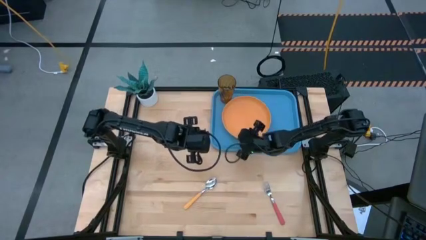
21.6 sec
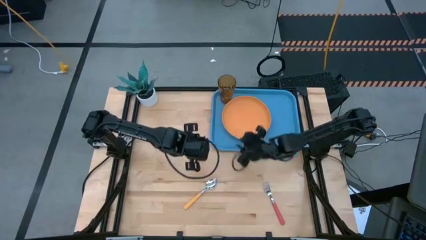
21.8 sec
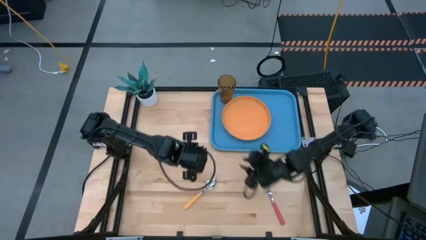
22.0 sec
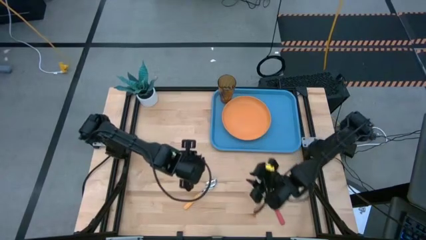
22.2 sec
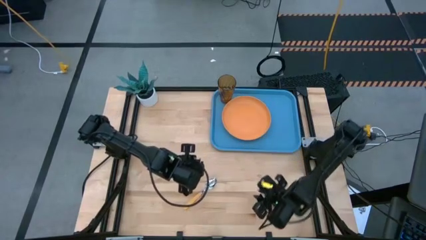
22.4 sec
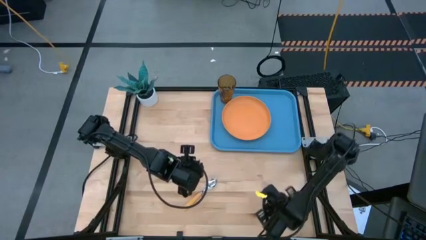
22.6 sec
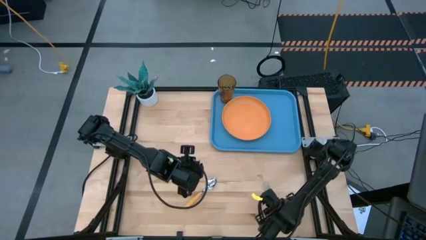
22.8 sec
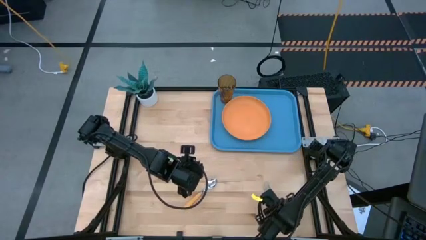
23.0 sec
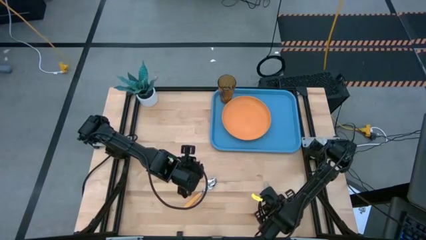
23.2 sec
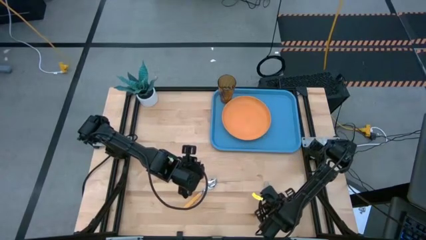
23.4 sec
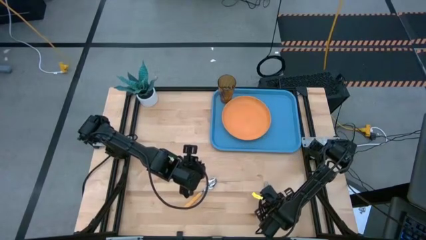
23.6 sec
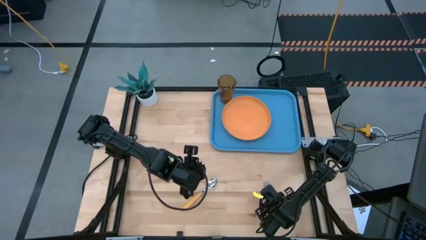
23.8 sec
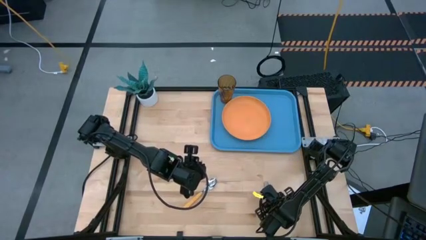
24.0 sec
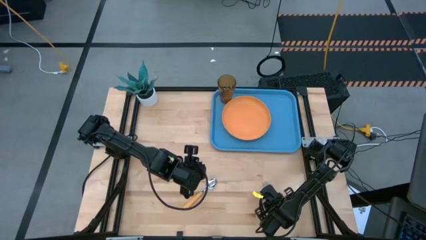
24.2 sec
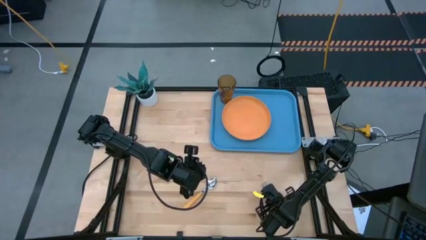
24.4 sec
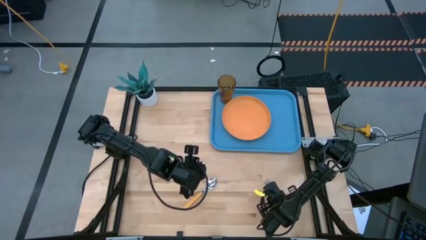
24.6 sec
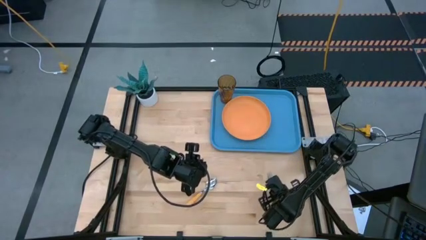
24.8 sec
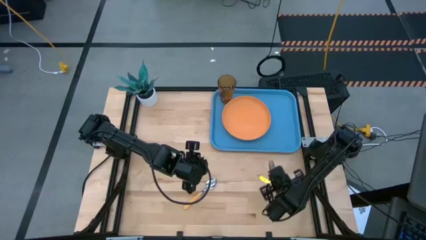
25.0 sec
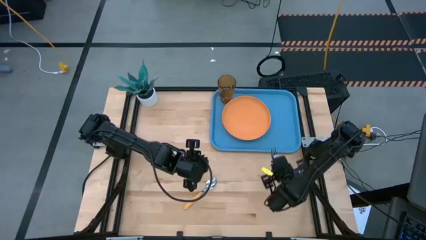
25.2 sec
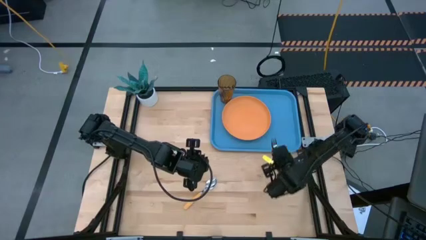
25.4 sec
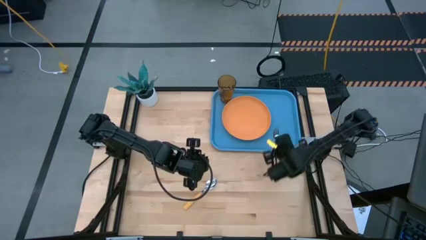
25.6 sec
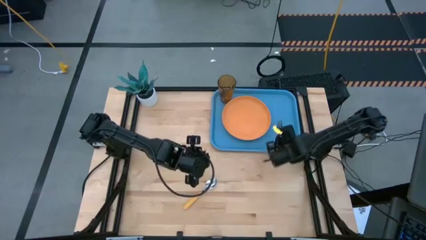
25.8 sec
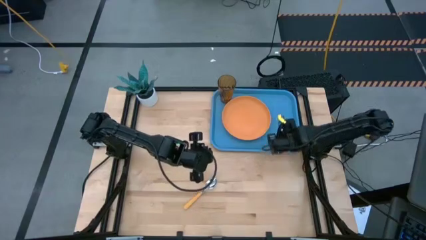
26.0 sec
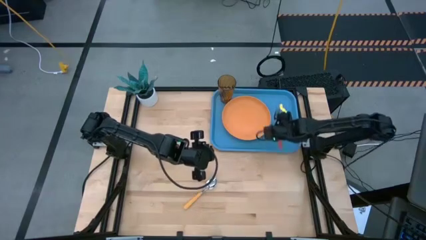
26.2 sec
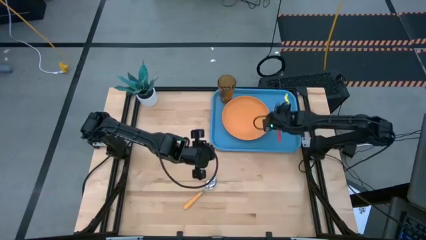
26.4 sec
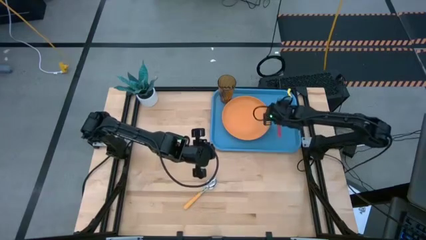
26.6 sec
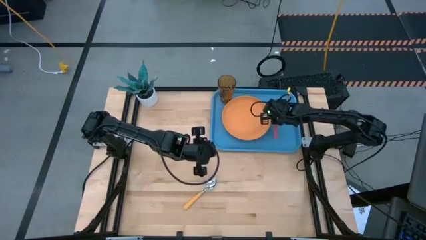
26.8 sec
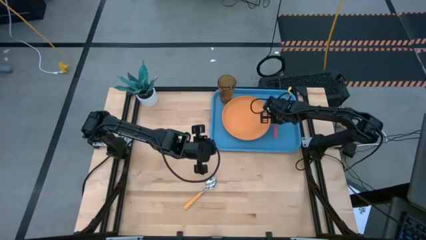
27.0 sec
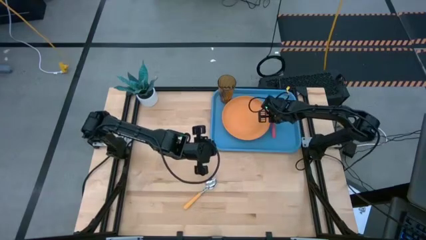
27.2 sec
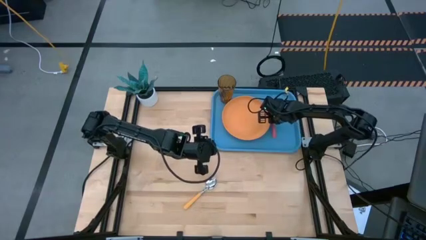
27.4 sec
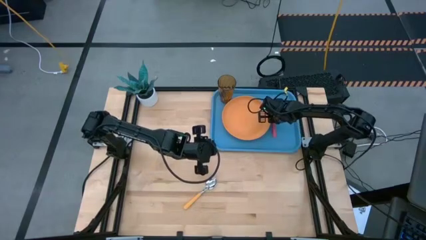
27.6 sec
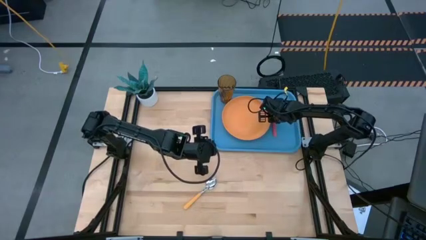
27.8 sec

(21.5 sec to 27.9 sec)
Task: Pick and place plate/cup/fork/spoon on tray
Put the red fork on the blue serving tray to the right of the orange plate

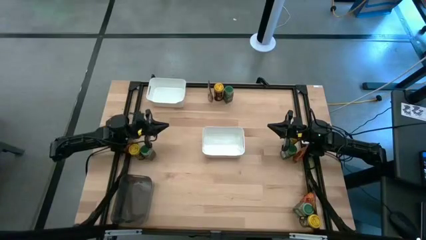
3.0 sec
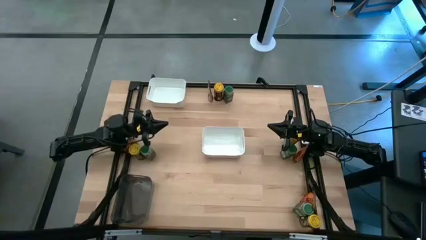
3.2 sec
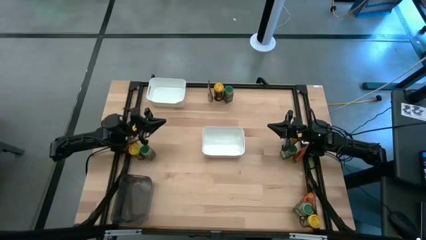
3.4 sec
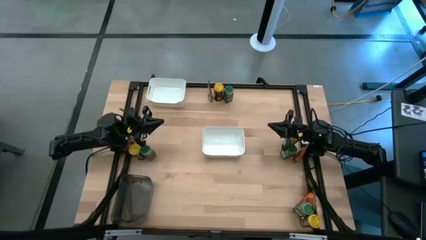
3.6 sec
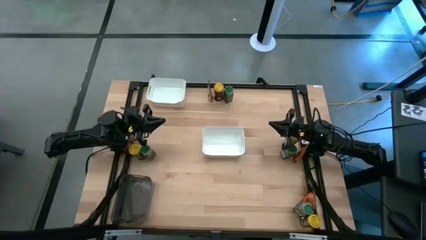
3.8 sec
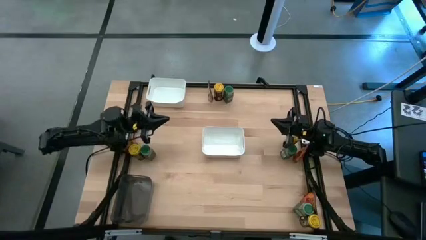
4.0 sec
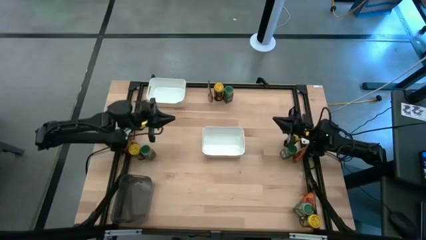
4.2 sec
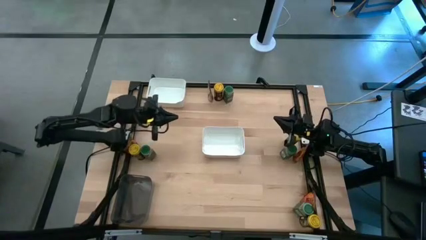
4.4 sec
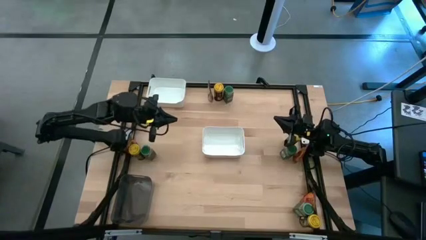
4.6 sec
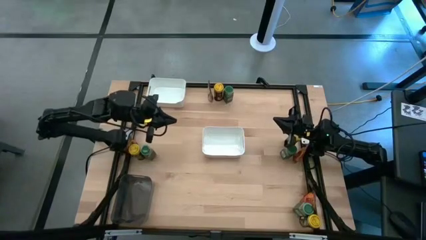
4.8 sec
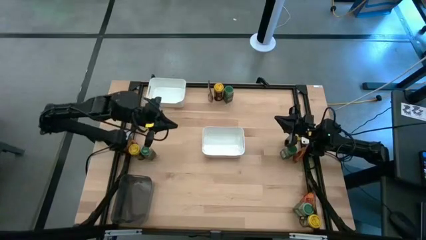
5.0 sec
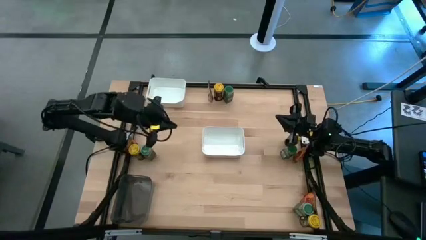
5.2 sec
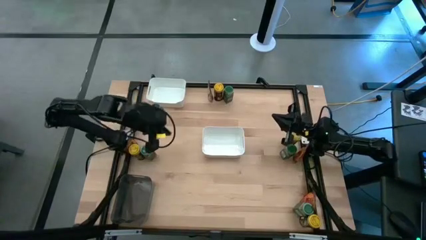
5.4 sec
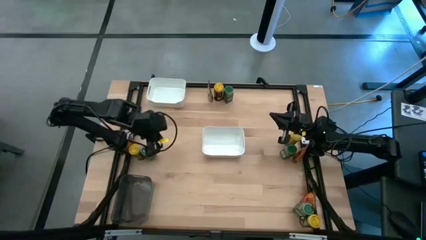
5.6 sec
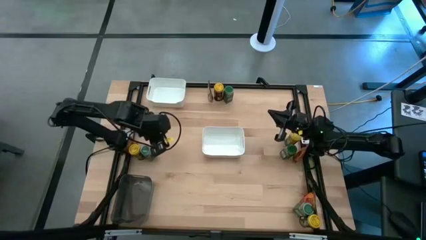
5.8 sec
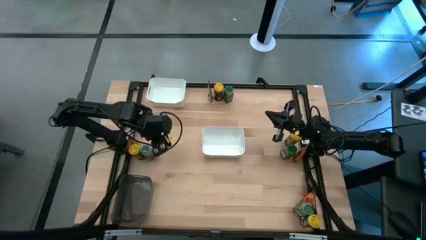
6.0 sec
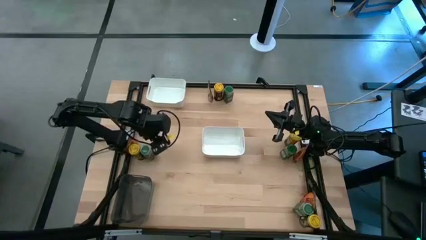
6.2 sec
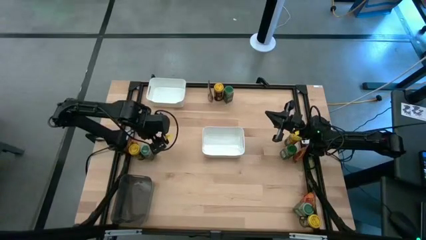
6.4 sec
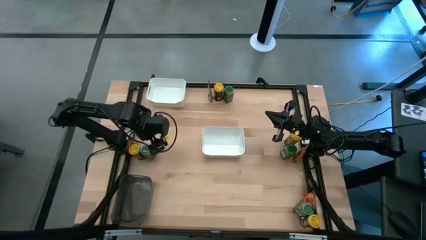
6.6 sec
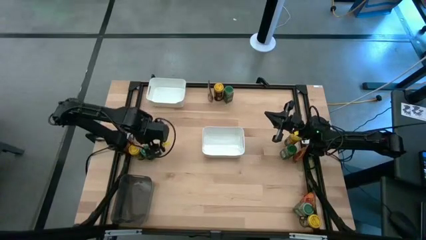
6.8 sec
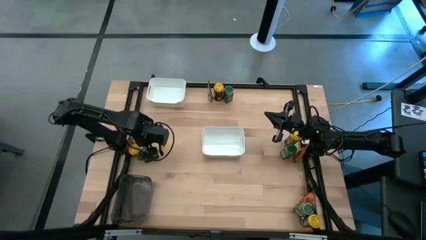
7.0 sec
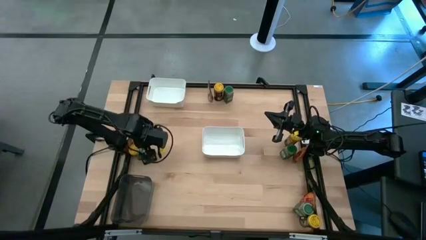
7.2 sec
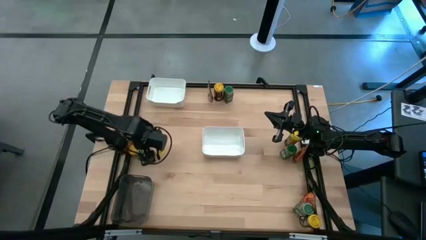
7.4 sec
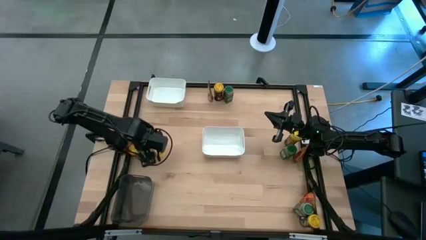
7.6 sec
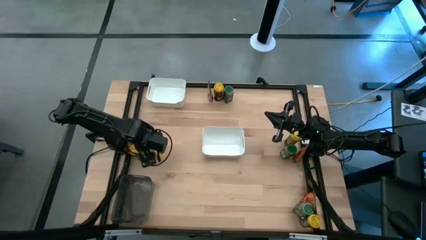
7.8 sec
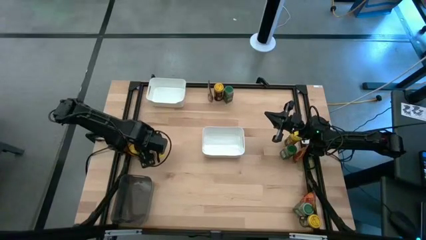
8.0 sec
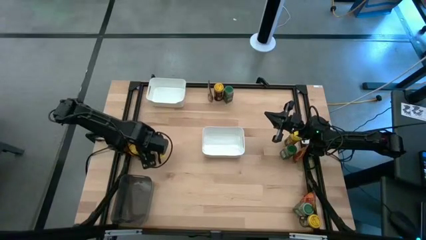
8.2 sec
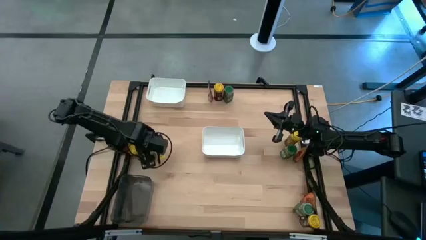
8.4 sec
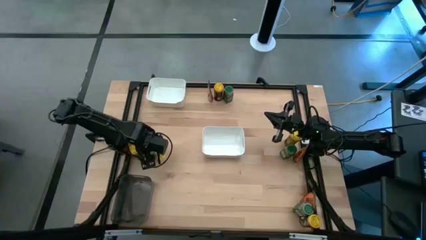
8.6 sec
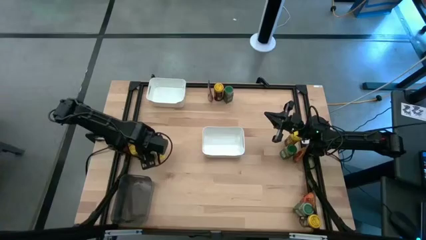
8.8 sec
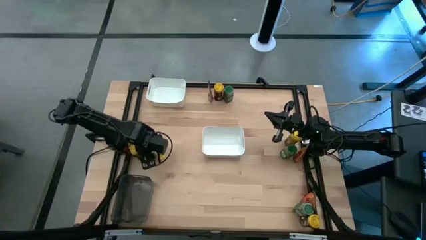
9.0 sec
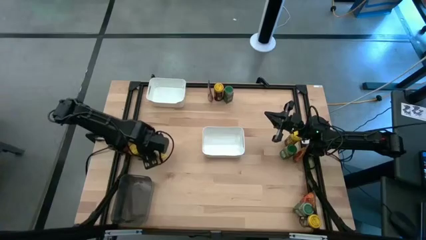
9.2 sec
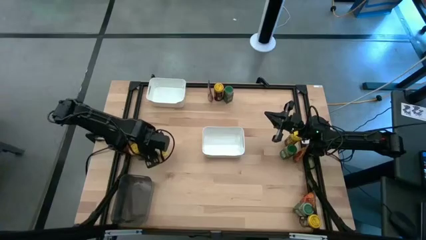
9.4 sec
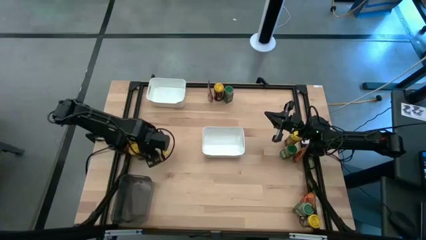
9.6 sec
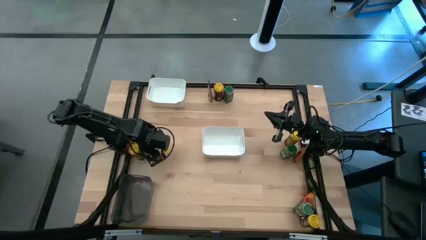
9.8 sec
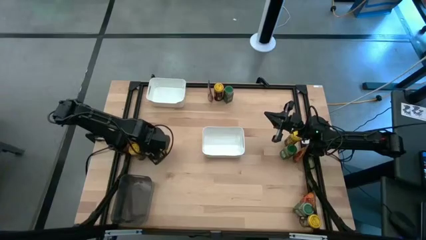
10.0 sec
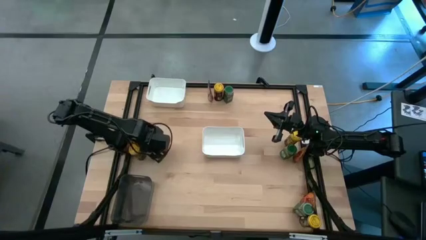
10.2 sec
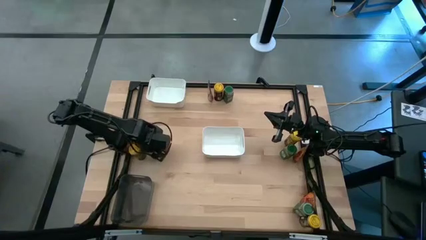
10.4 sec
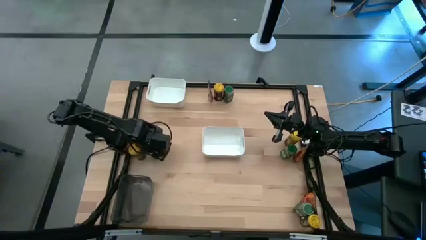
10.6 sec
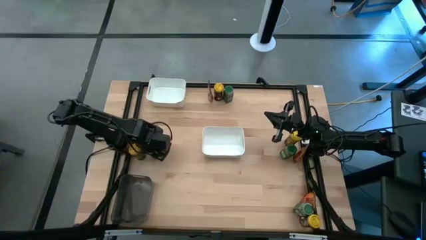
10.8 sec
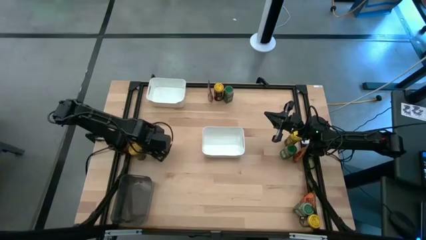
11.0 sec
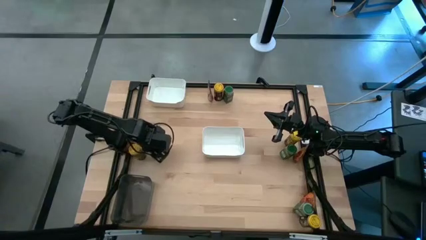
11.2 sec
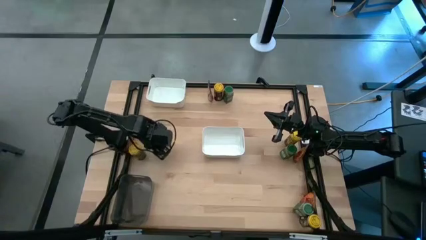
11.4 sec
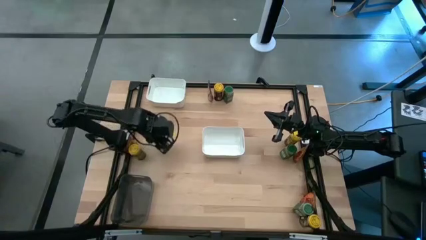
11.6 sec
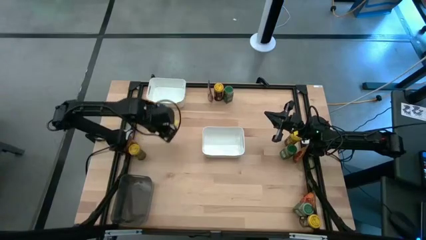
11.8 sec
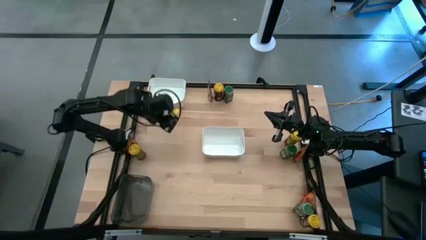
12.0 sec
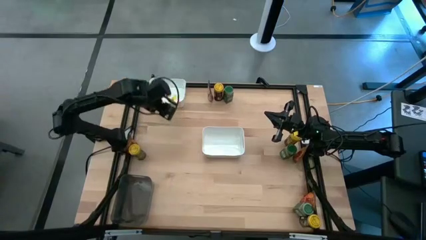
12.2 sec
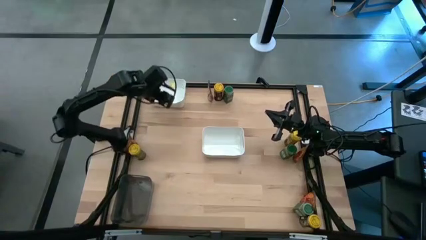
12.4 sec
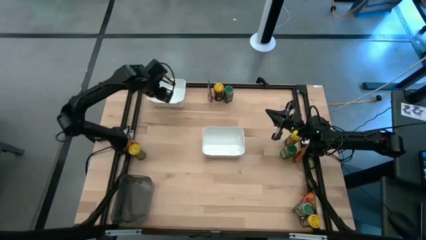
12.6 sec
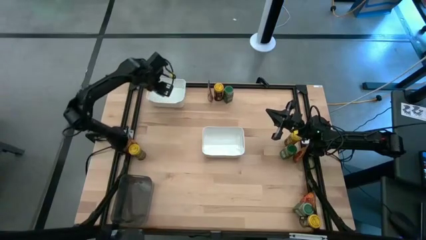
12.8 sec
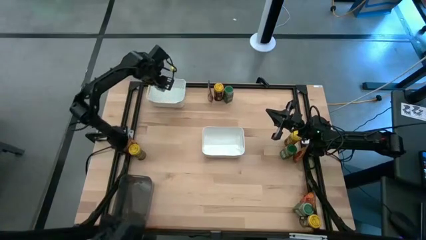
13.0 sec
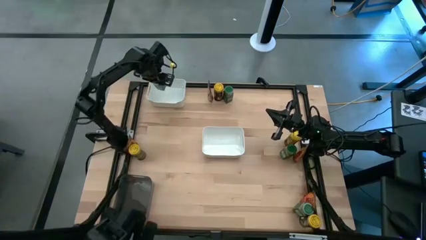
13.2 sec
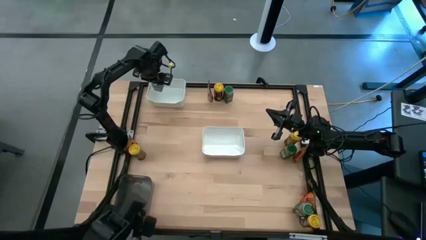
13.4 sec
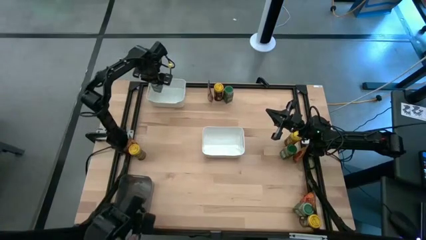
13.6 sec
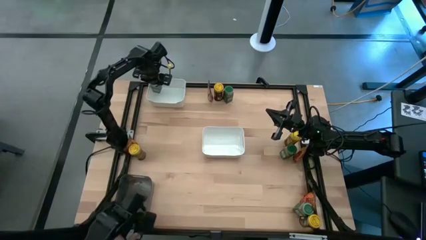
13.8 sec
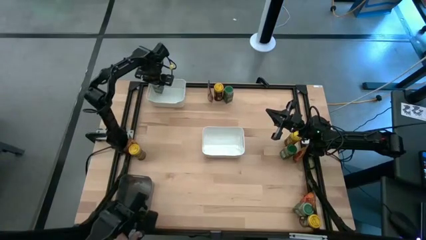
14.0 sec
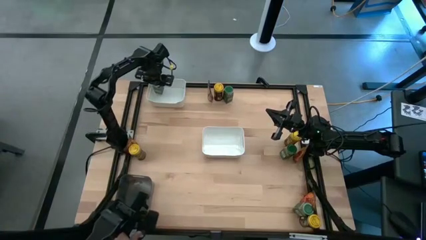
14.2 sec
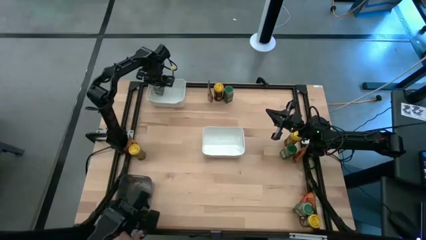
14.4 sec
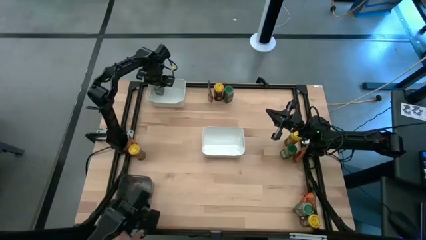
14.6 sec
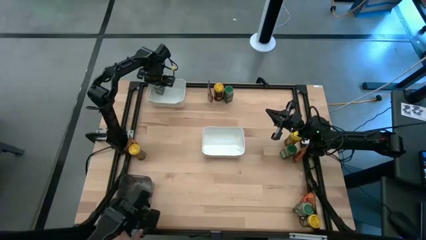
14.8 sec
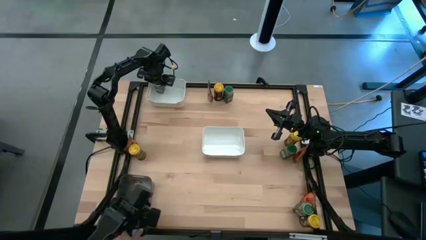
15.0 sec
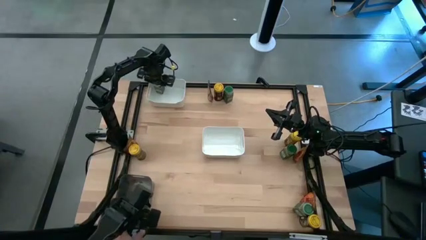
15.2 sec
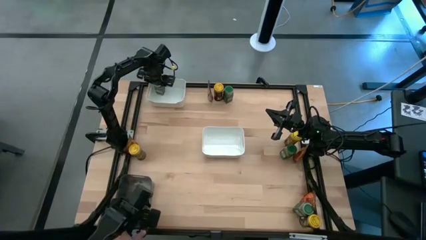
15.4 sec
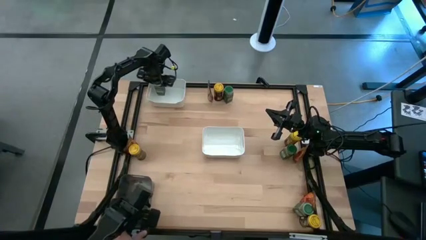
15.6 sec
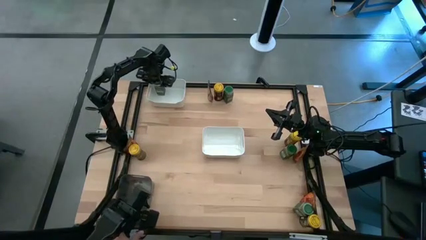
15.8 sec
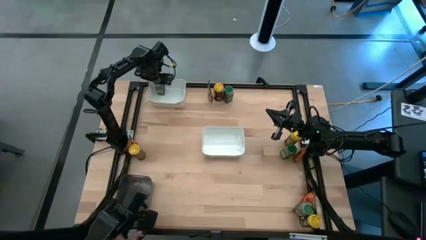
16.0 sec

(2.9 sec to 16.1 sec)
Task: Sort spices by type
Put the green seasoning bottle into the top white bin
